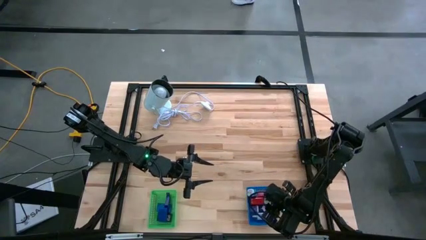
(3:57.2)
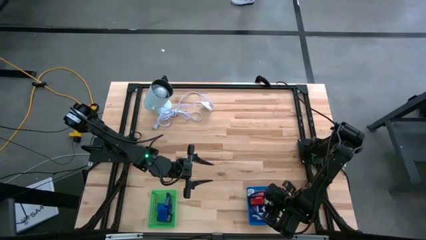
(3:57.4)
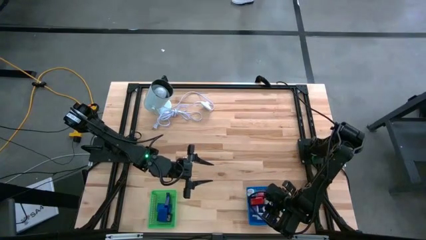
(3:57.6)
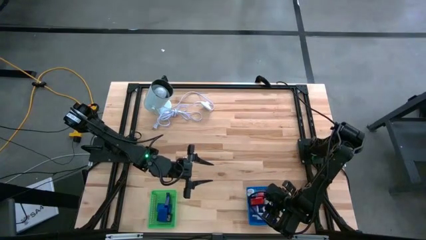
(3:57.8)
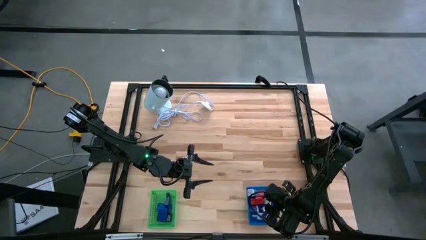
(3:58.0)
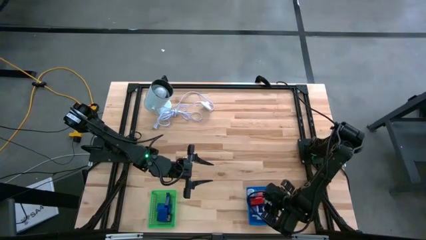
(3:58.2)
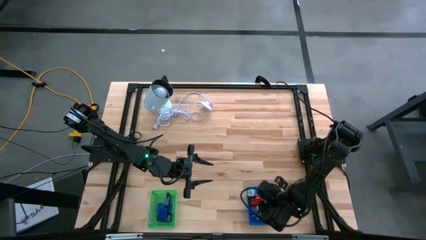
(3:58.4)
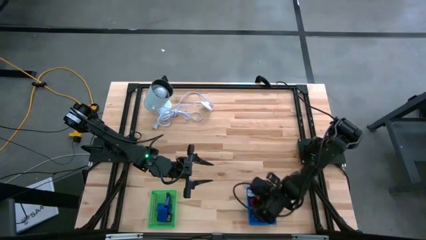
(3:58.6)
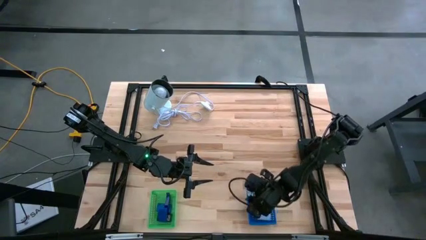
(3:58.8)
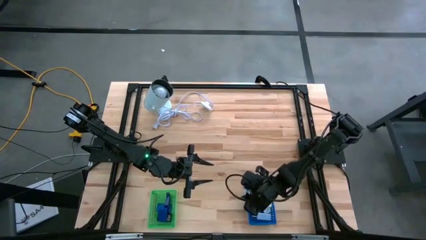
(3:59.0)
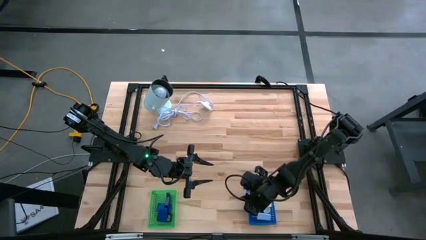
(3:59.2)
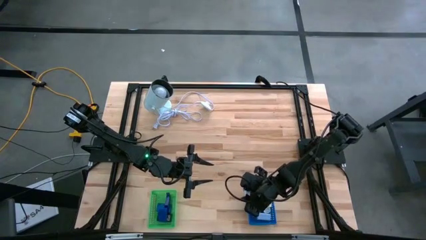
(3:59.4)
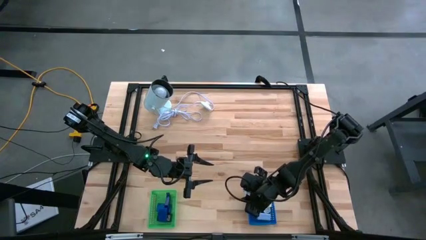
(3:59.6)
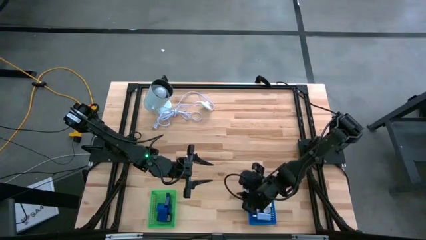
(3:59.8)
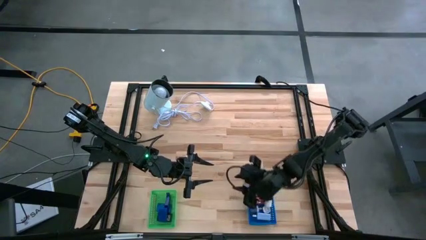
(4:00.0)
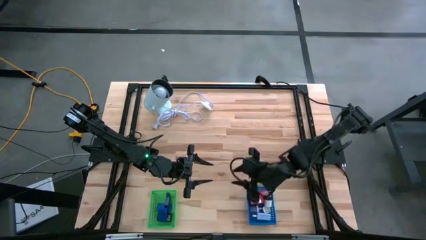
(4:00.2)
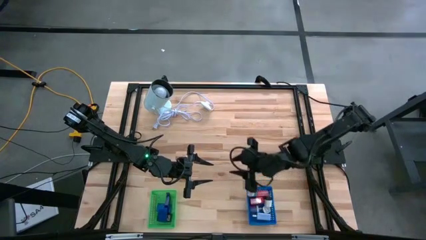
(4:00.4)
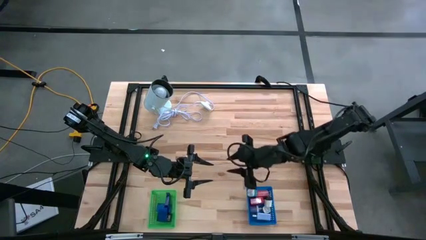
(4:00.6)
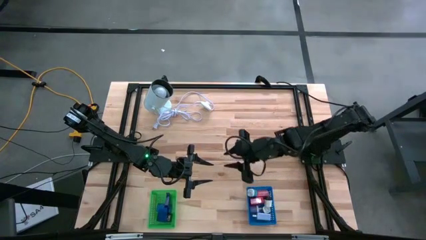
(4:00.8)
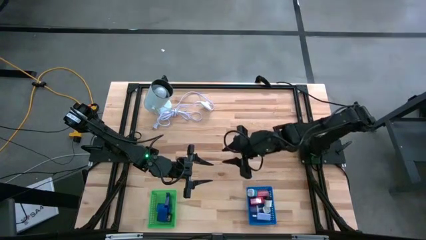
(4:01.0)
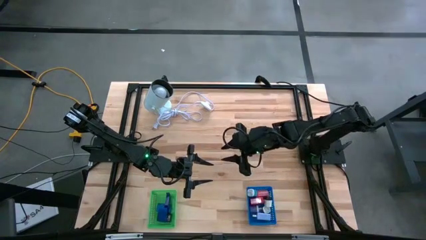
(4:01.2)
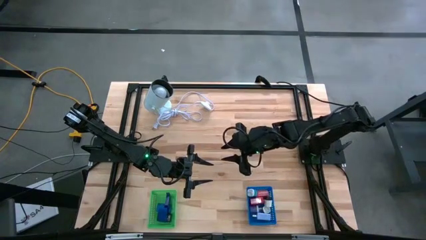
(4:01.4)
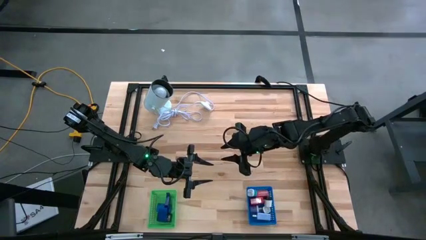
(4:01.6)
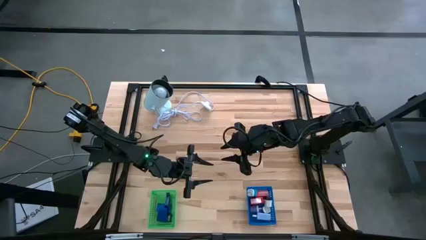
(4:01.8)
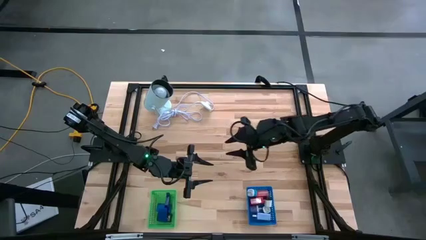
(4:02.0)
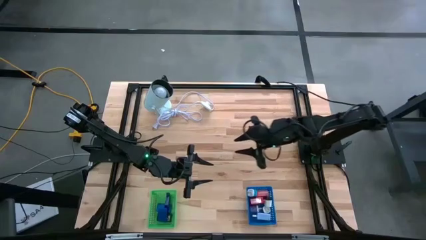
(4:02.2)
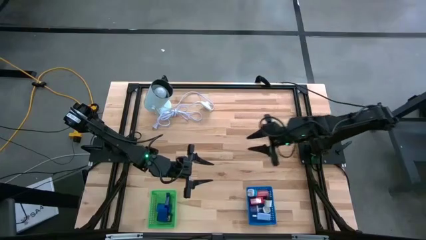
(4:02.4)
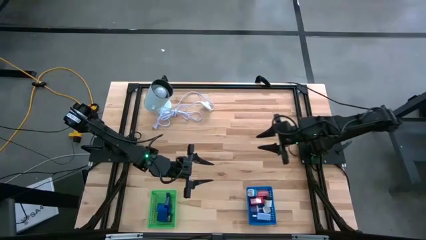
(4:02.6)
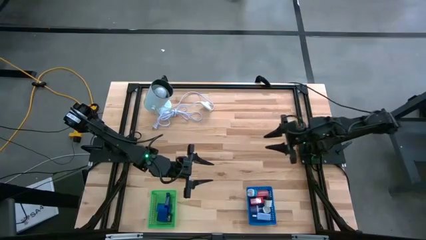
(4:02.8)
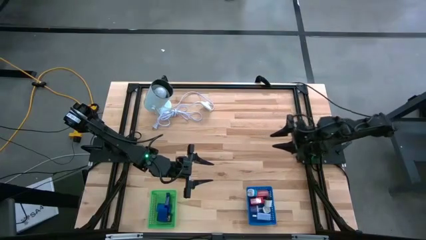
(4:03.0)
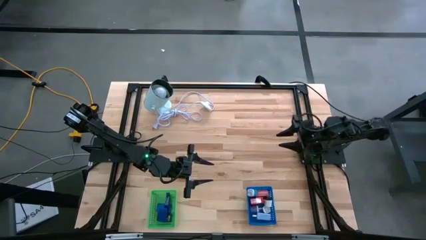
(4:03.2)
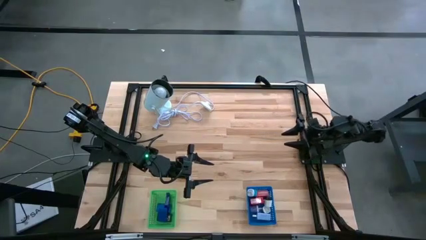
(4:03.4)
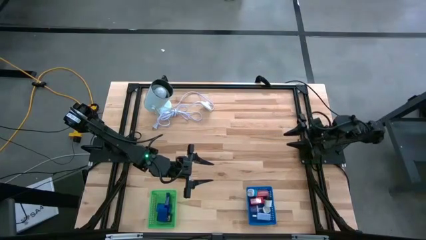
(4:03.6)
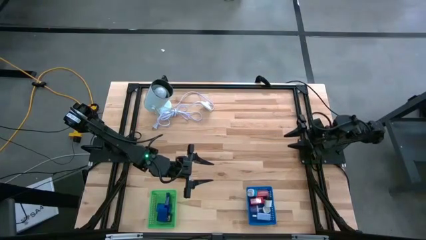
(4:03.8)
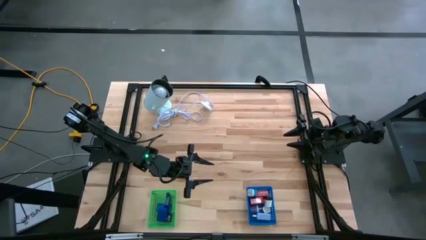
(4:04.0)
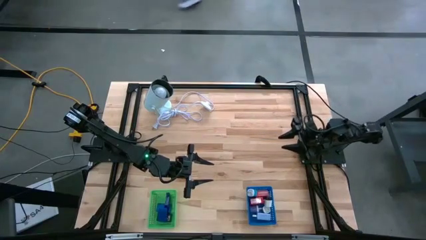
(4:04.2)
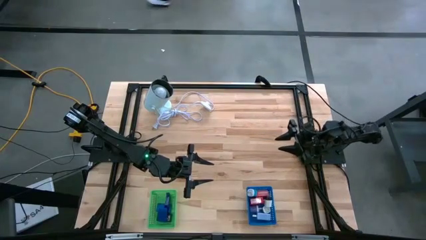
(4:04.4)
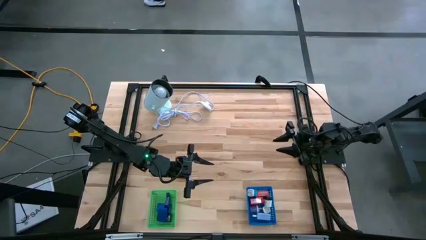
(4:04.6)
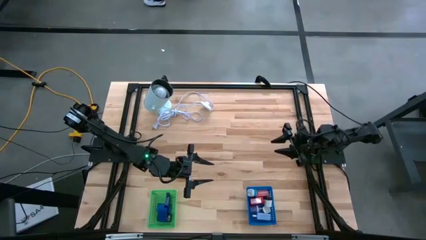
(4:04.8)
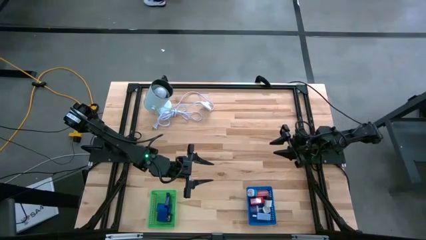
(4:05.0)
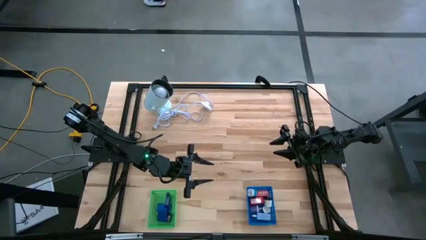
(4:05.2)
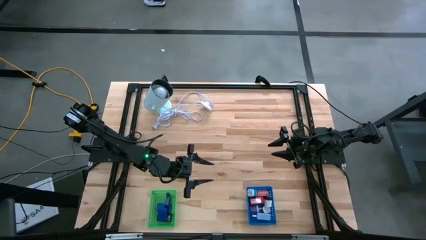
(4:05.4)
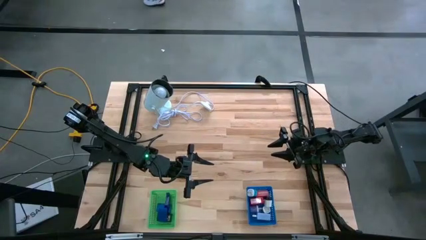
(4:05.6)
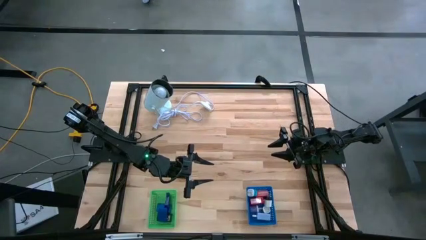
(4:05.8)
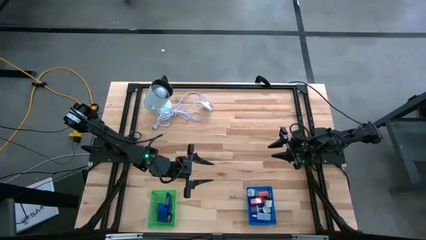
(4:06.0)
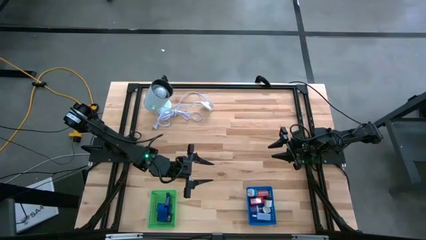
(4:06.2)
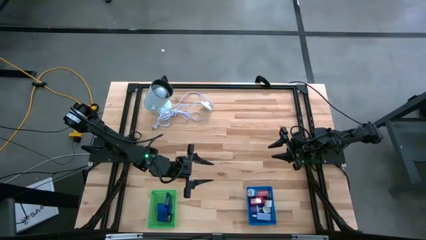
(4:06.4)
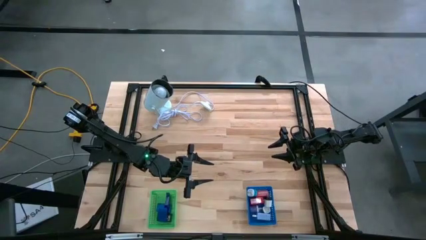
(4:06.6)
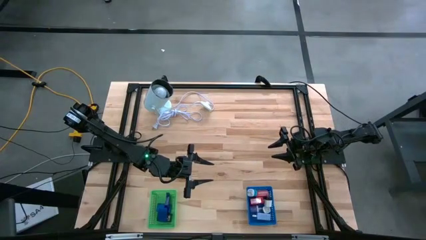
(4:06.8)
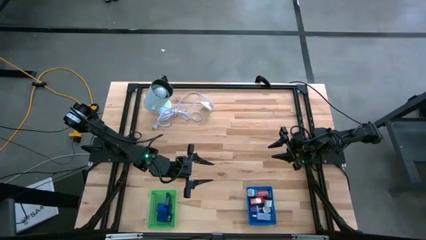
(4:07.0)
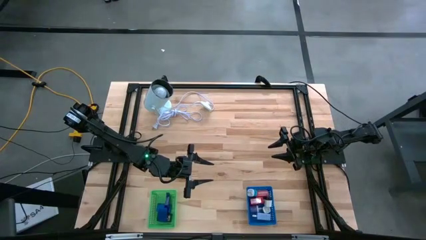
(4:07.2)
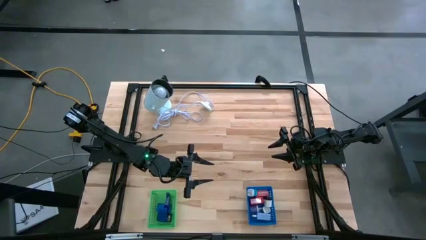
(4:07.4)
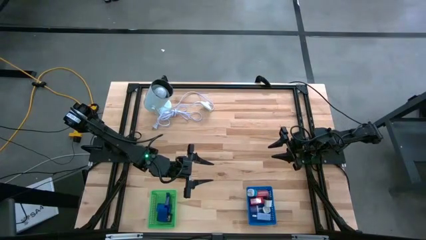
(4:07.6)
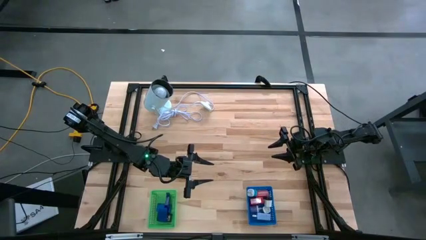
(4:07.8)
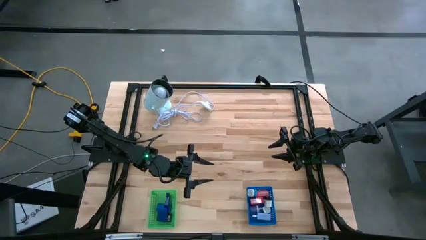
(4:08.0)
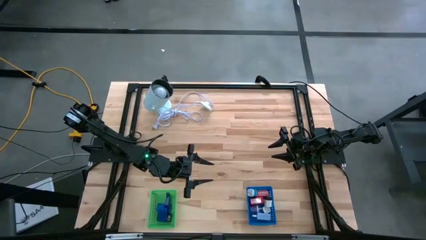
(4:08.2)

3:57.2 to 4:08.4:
Task: Pick & Place Office items
Return to Home Position

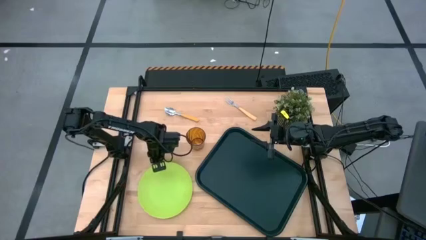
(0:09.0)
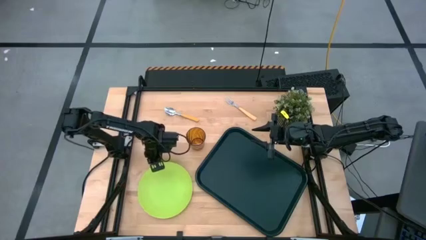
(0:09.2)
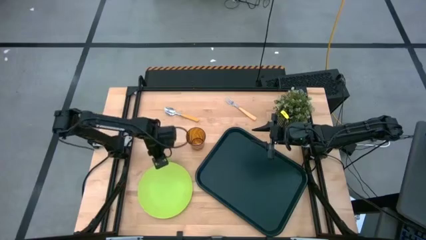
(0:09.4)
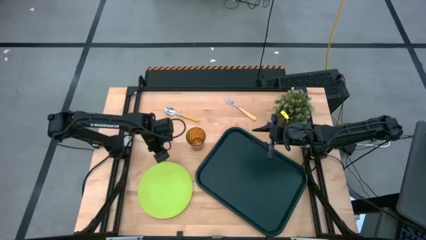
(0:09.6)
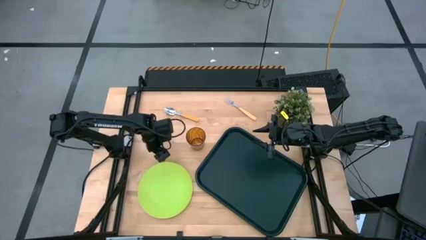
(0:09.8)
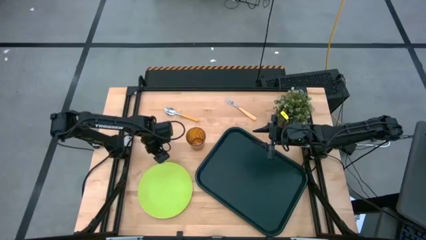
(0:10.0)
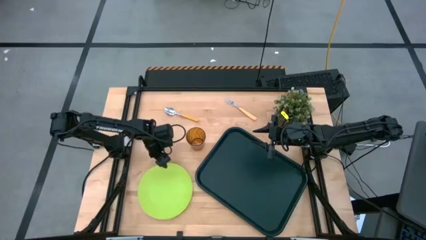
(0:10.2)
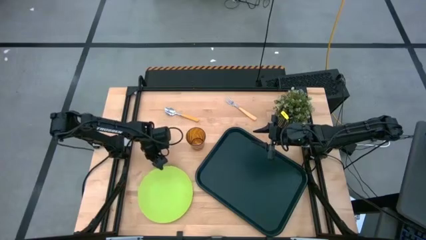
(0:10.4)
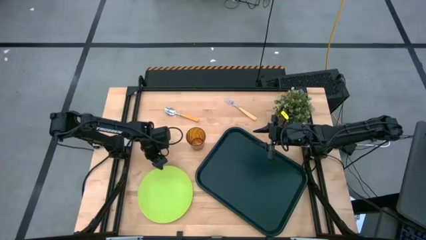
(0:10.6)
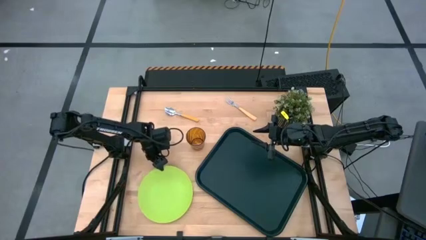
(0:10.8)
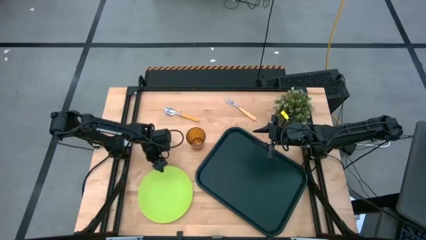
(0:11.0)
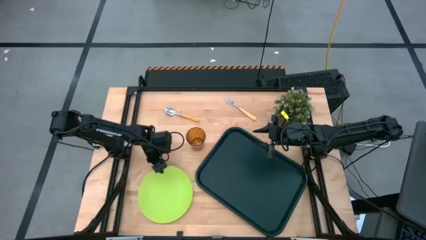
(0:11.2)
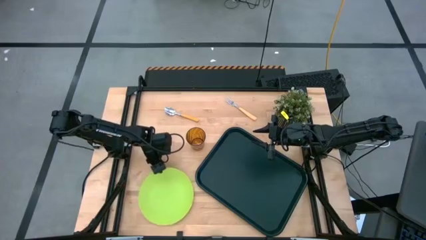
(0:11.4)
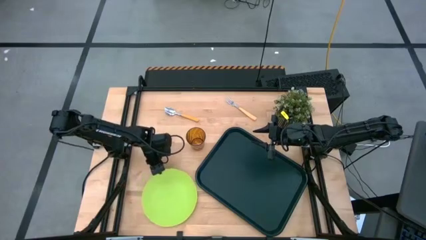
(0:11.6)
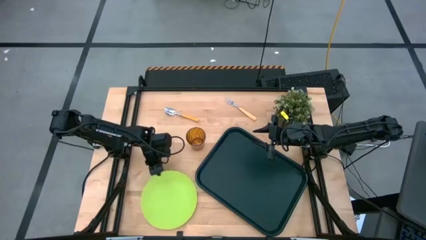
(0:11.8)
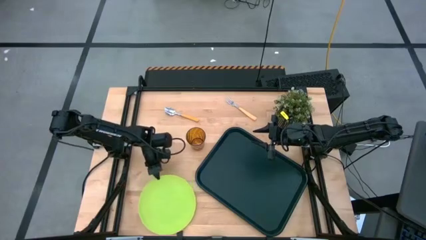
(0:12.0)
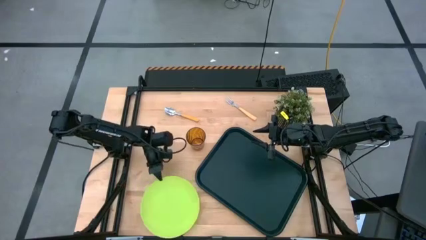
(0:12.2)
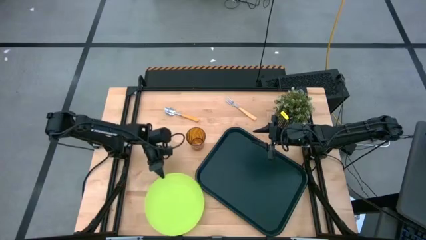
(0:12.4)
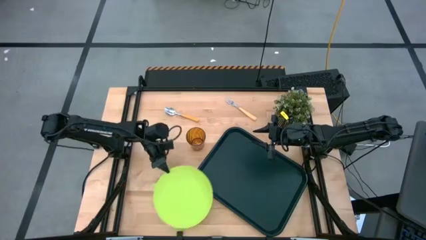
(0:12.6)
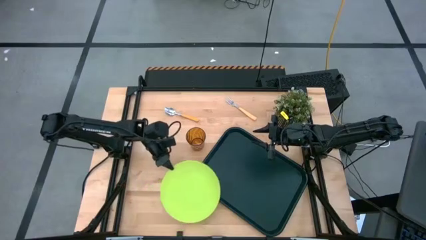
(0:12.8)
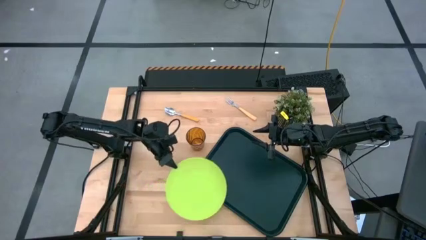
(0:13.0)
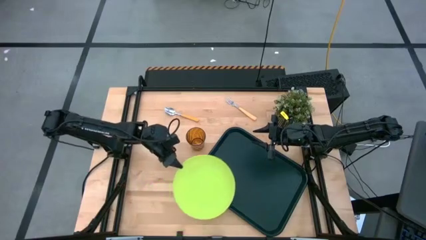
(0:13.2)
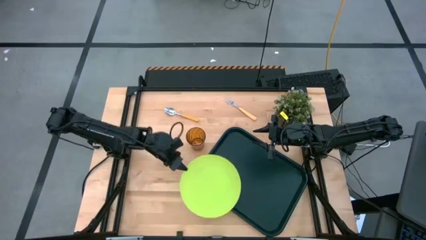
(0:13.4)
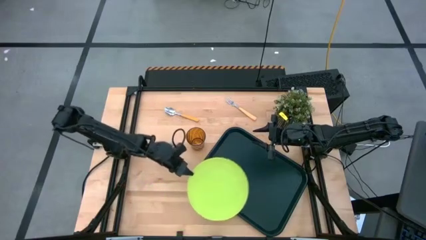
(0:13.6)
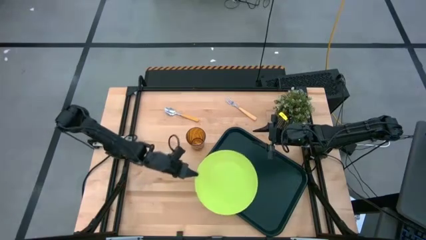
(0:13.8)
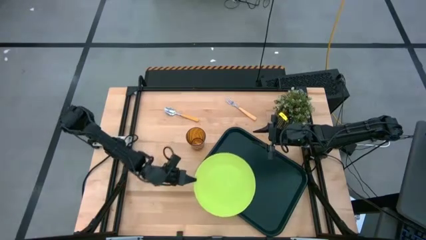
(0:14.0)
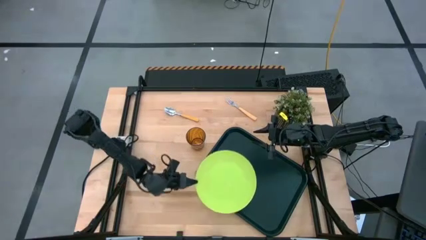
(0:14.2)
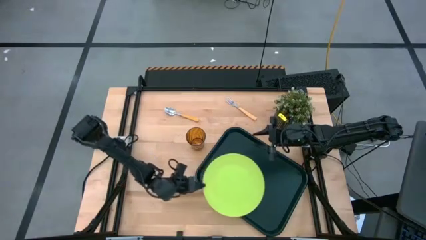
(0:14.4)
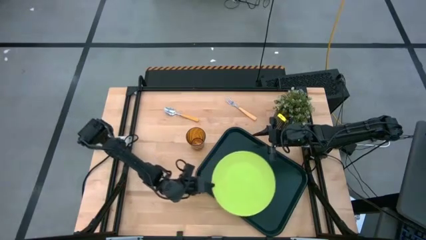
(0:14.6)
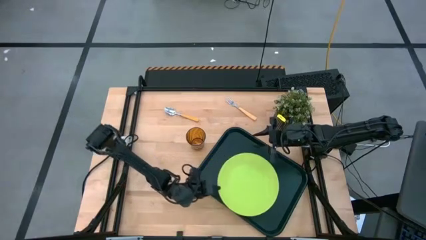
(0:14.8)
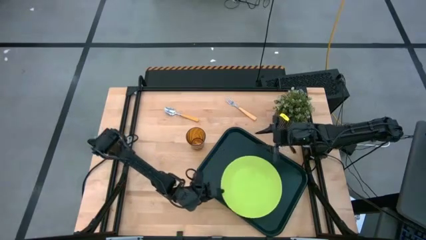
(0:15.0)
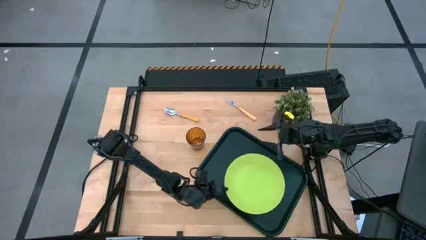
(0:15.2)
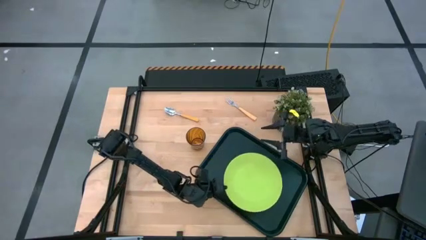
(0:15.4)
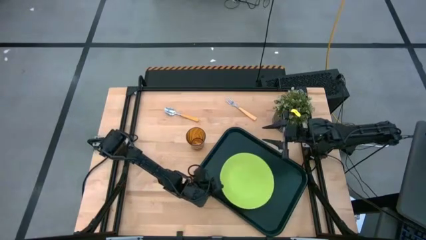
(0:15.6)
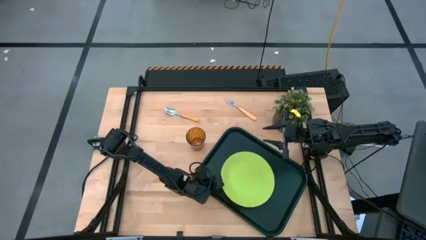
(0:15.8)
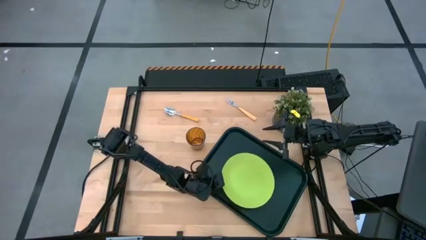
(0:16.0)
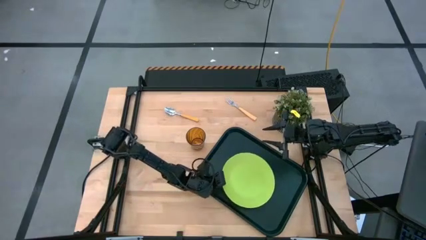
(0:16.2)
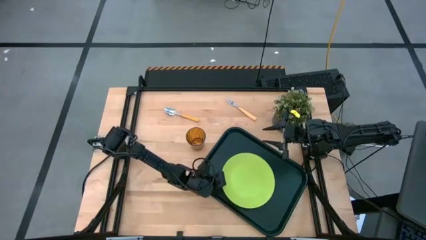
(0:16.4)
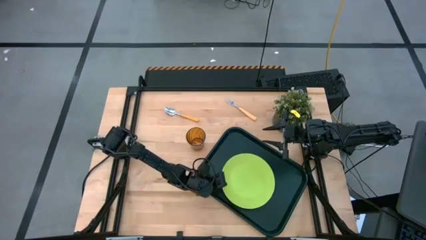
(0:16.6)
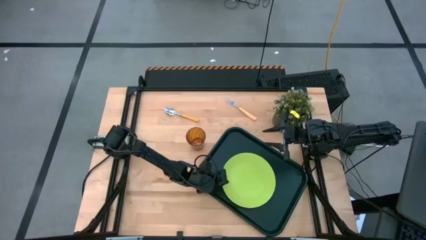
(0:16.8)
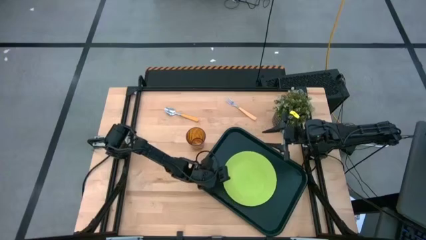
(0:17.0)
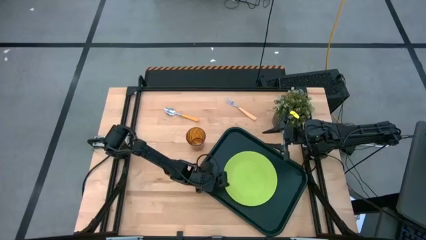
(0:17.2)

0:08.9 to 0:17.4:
Task: Pick and place plate/cup/fork/spoon on tray
Put the green plate on the center of the black tray
